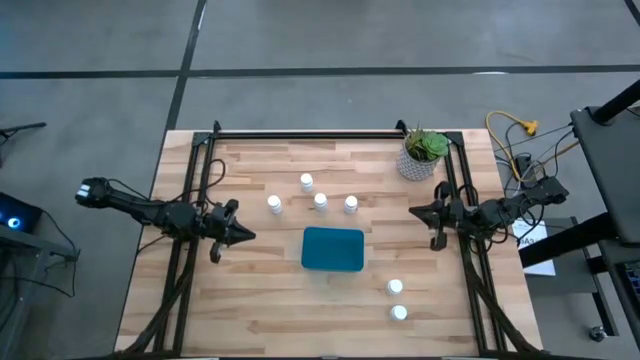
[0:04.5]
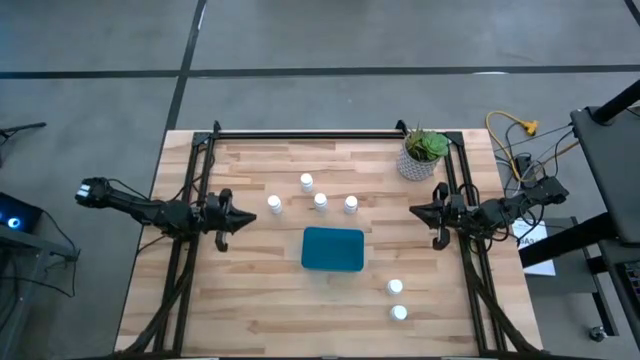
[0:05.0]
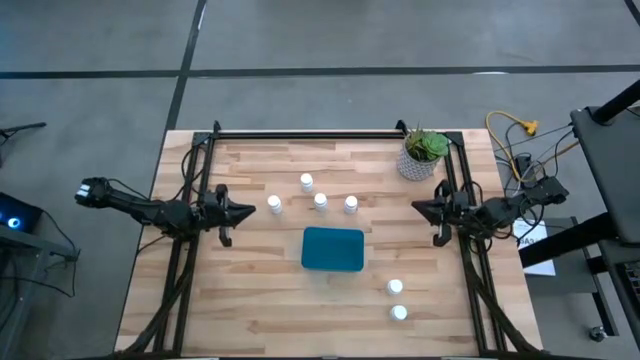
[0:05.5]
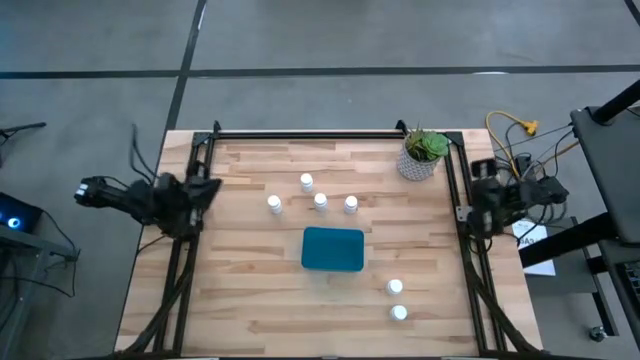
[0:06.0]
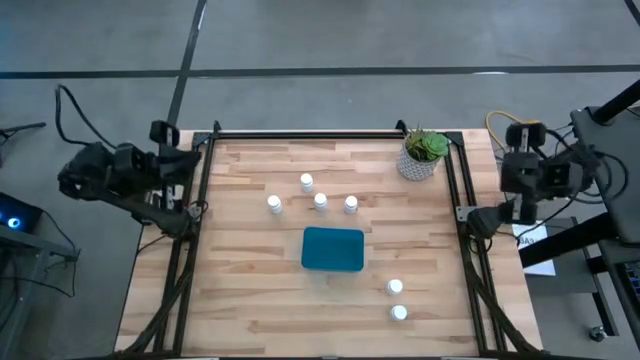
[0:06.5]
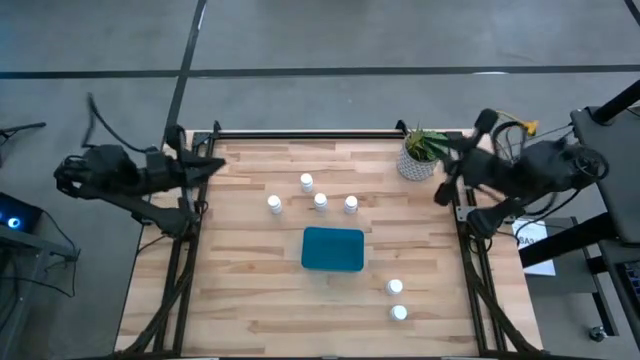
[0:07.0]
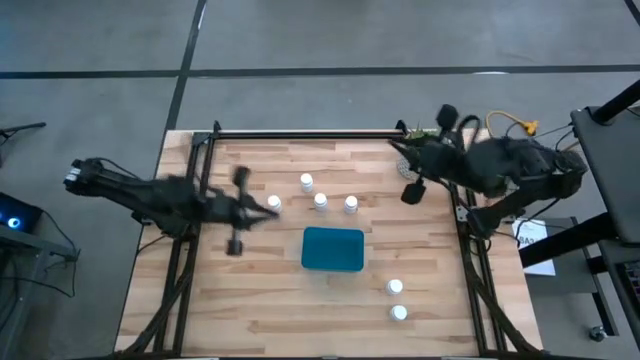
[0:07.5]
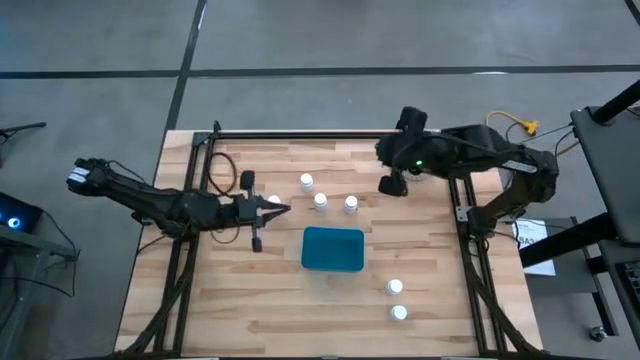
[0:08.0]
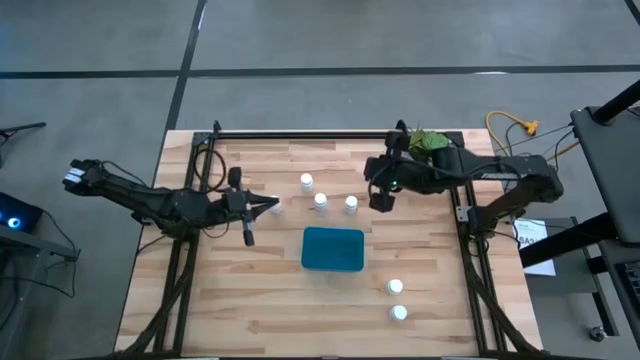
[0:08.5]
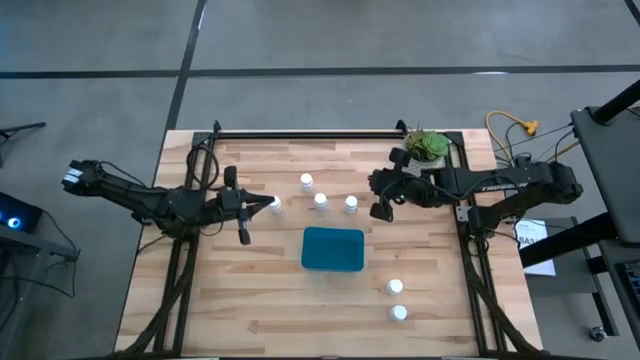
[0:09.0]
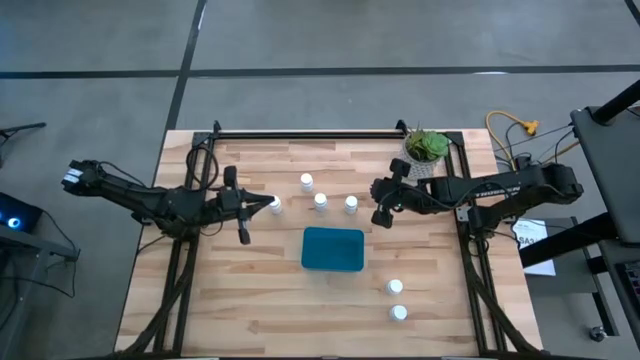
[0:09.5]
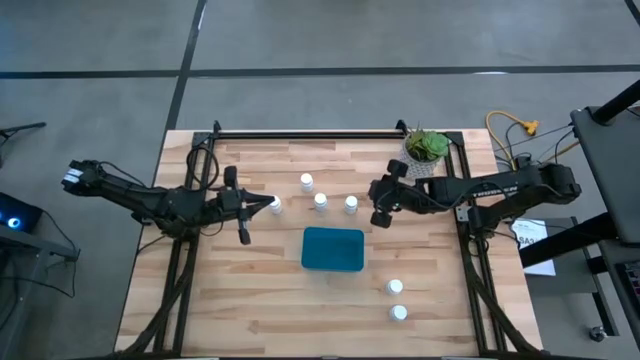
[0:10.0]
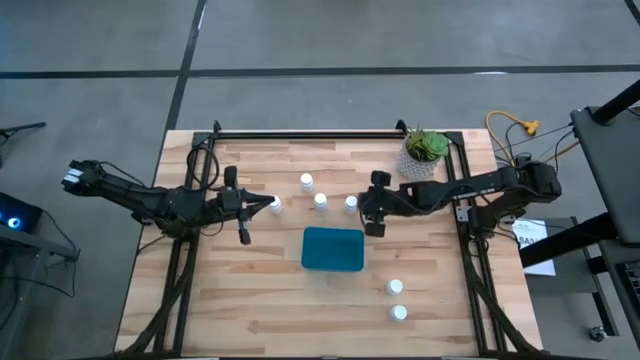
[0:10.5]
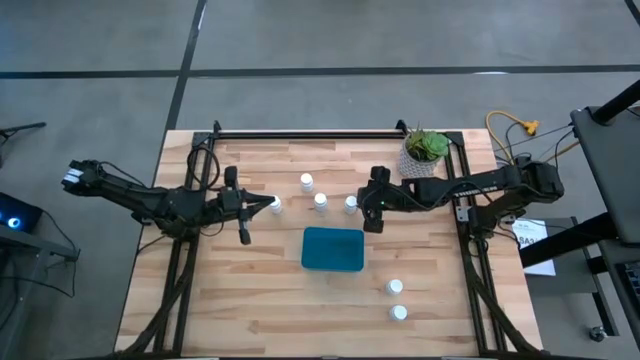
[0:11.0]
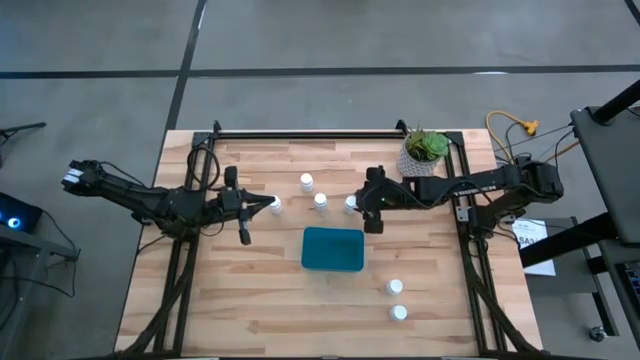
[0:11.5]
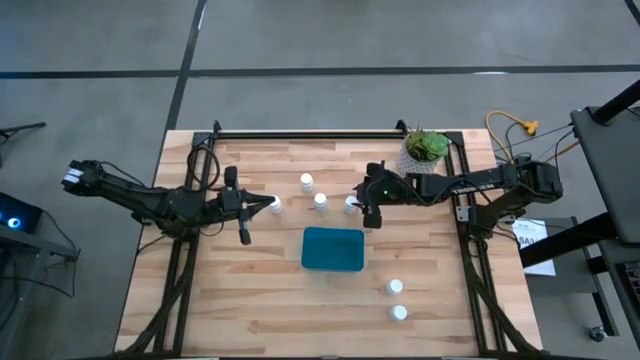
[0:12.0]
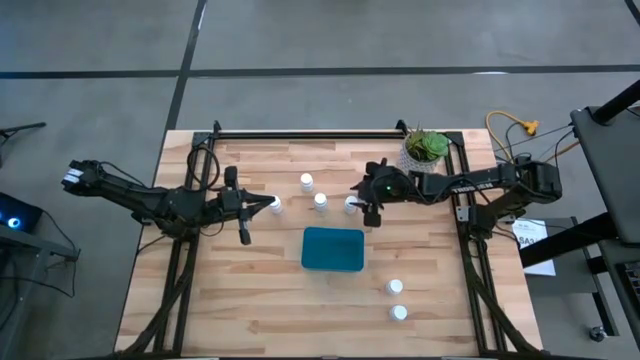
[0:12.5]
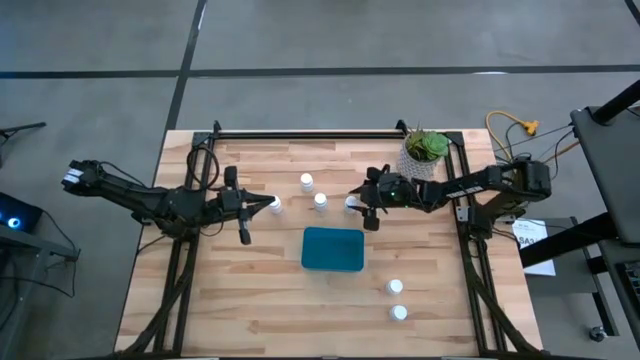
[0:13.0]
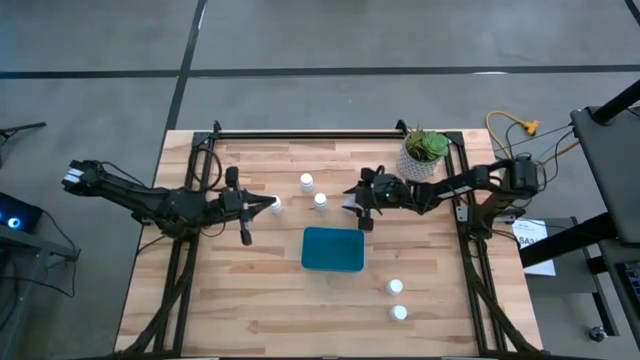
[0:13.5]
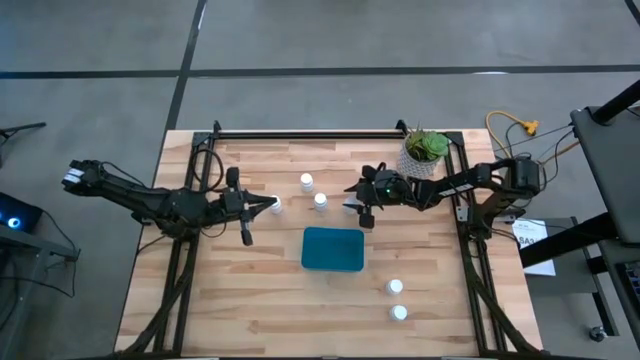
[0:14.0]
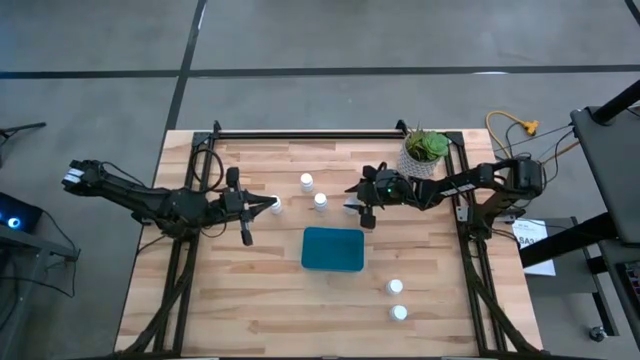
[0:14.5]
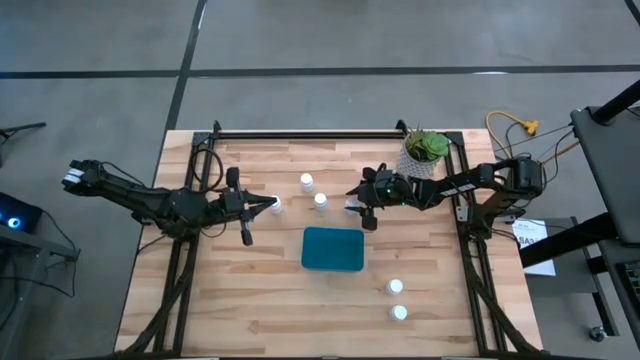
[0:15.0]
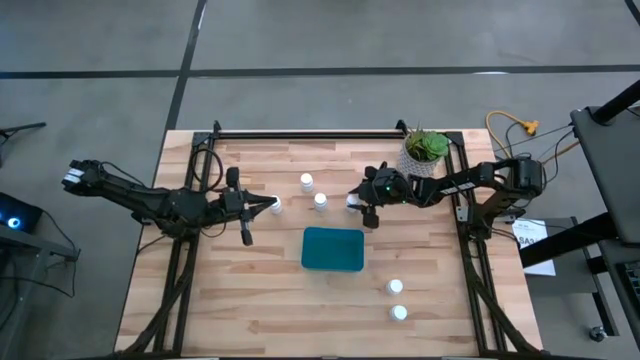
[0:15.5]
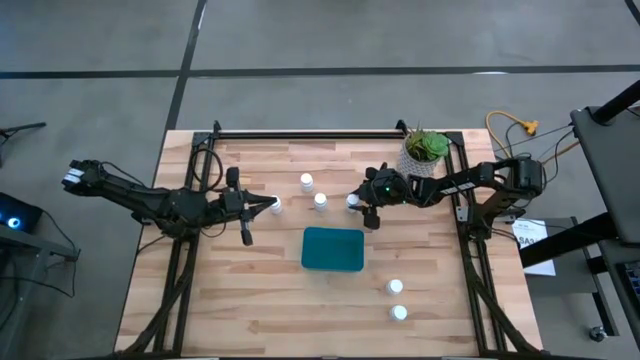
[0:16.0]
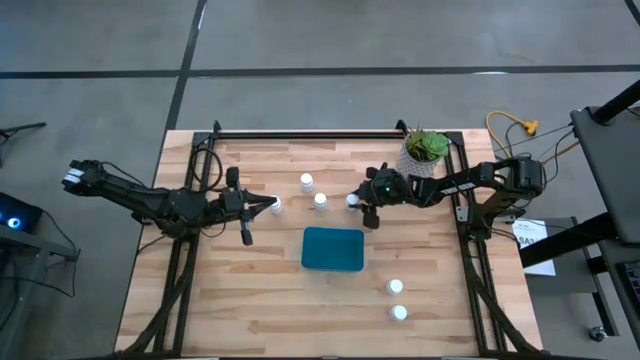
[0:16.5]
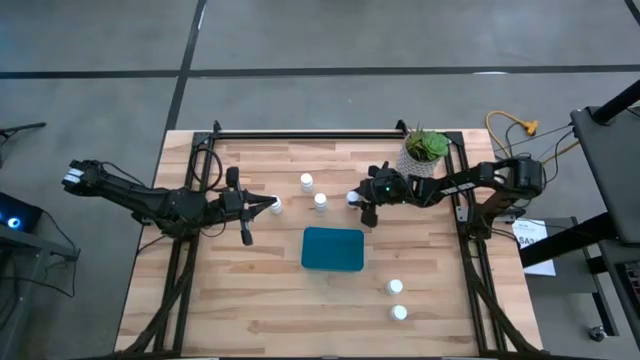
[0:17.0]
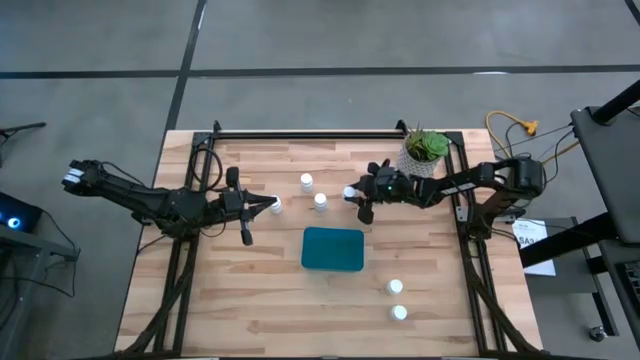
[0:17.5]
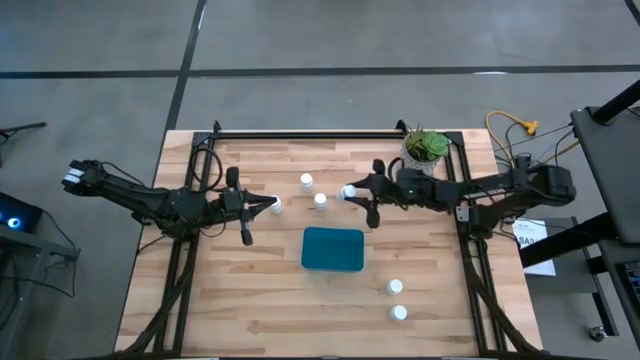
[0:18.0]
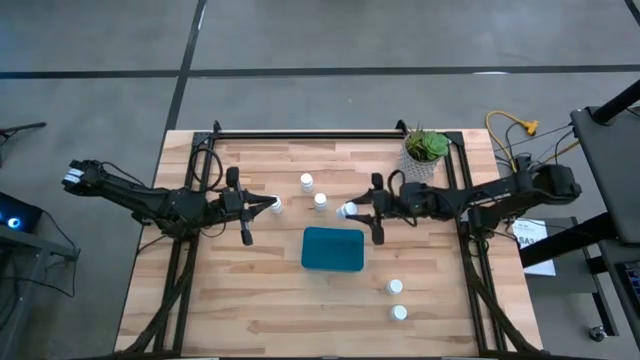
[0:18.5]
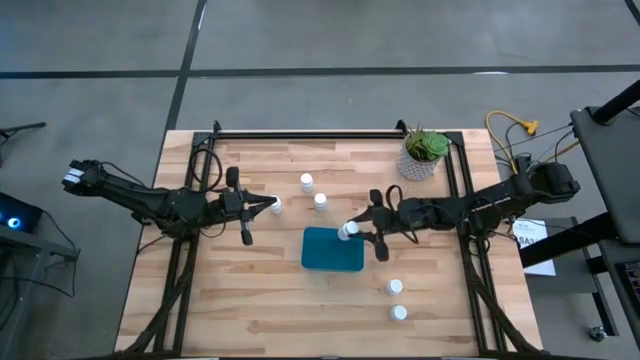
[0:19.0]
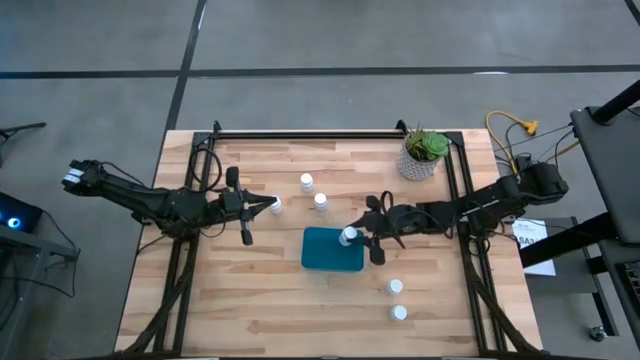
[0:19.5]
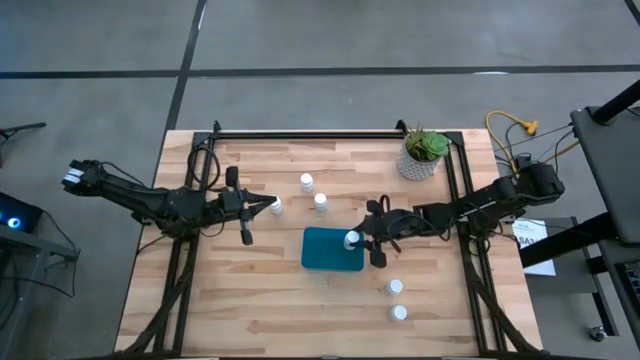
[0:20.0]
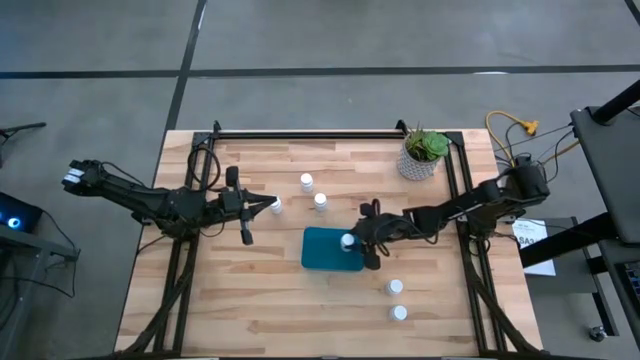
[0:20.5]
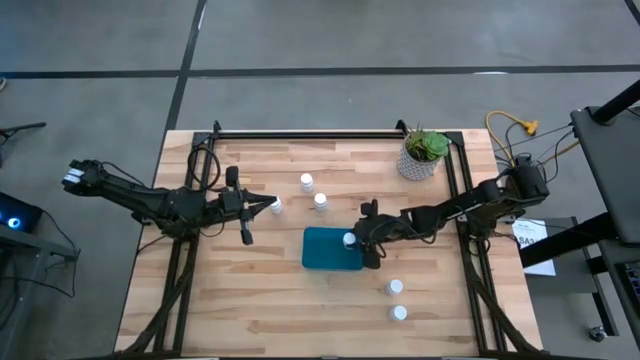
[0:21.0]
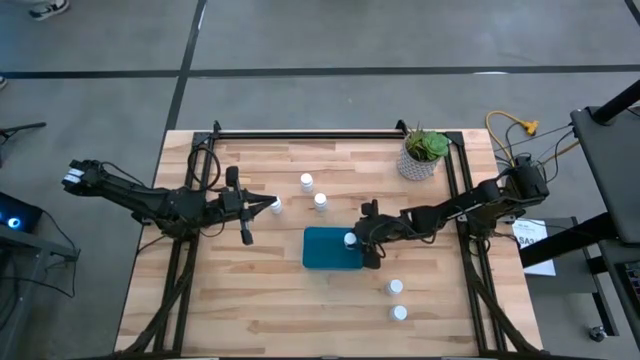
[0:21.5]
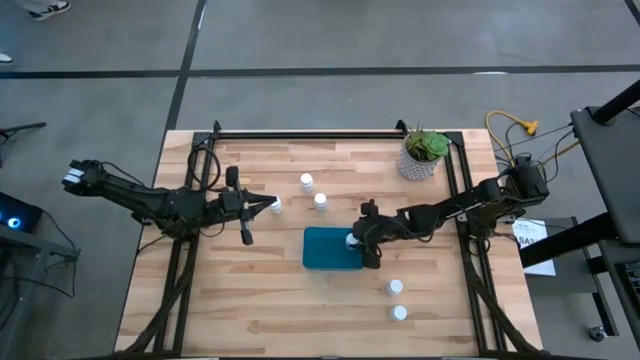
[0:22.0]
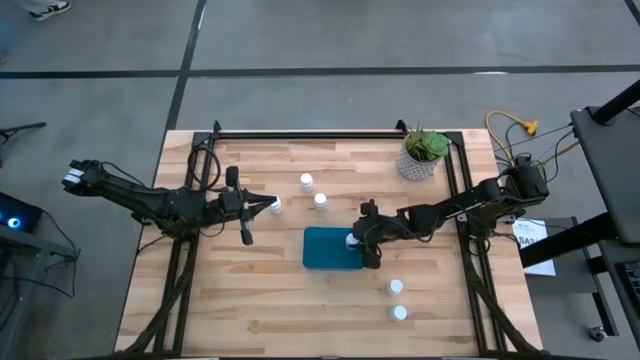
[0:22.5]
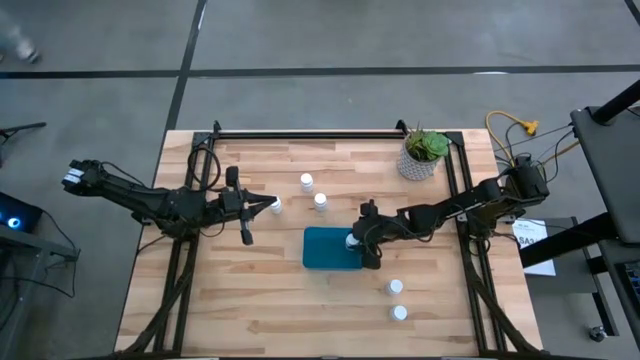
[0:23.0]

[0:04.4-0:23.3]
Task: Pick and place pill bottles into a basket
Put the white pill bottle into the blue bin
